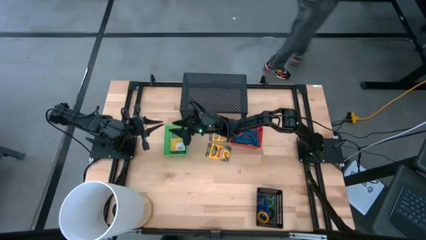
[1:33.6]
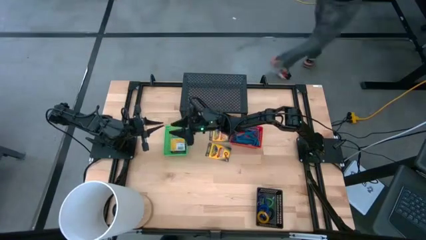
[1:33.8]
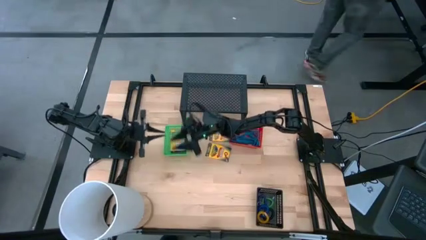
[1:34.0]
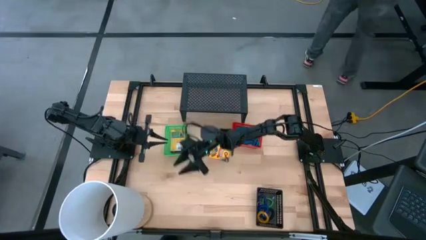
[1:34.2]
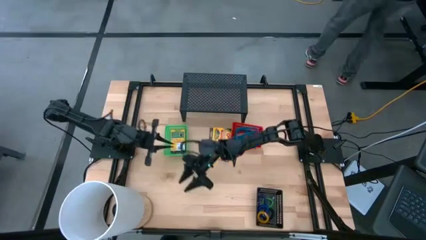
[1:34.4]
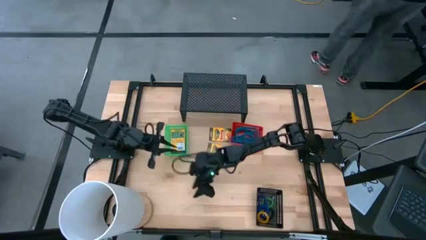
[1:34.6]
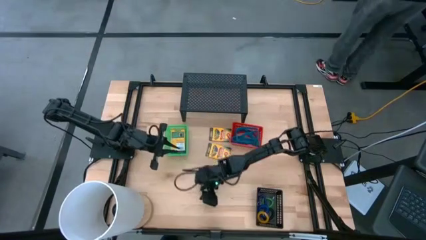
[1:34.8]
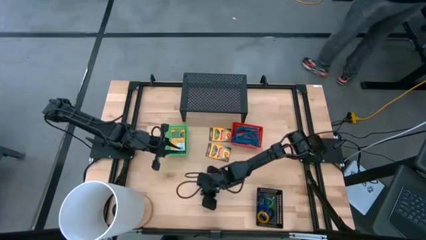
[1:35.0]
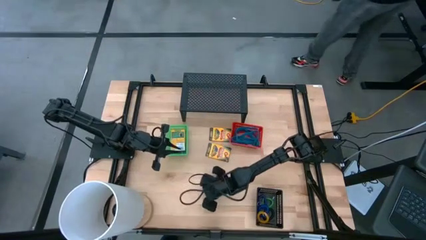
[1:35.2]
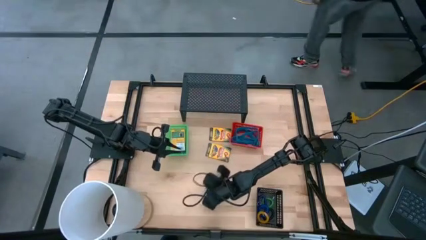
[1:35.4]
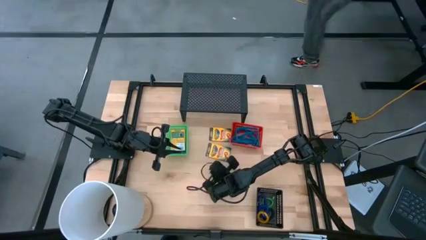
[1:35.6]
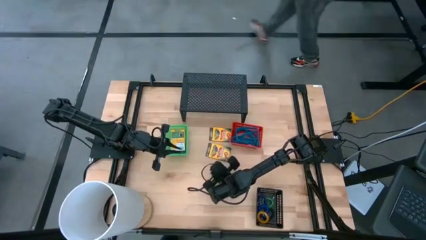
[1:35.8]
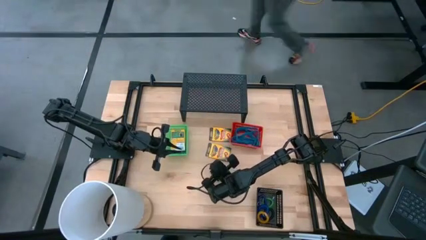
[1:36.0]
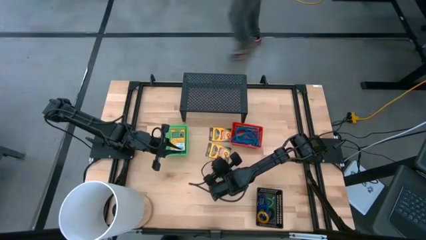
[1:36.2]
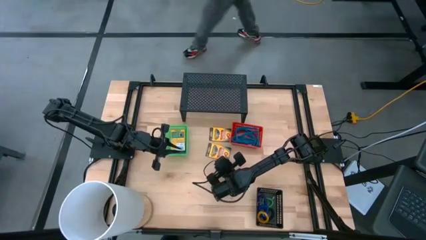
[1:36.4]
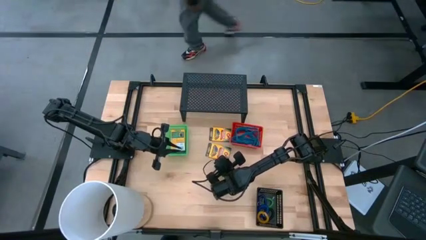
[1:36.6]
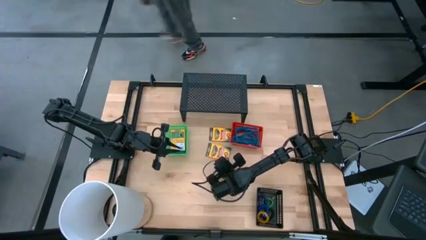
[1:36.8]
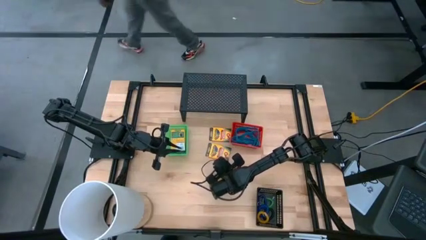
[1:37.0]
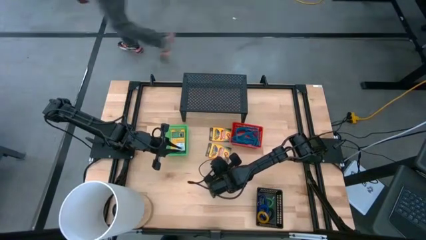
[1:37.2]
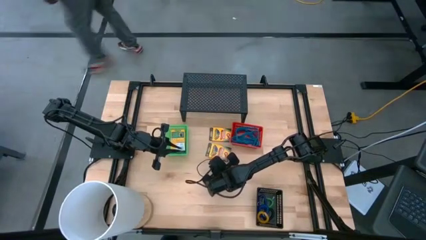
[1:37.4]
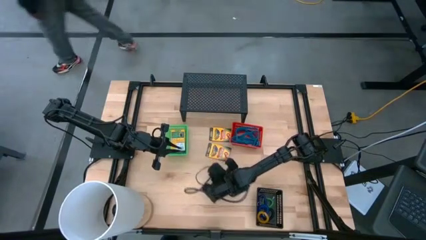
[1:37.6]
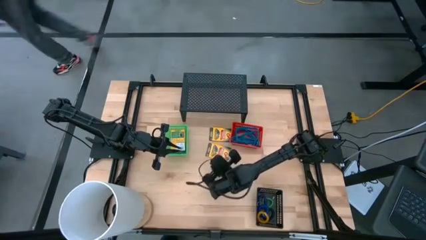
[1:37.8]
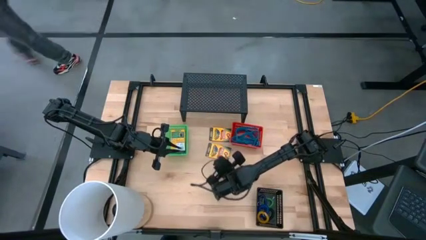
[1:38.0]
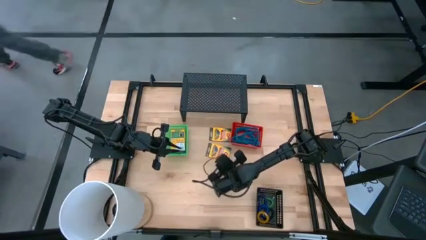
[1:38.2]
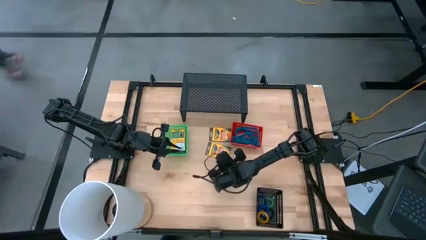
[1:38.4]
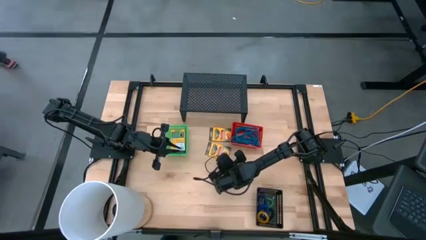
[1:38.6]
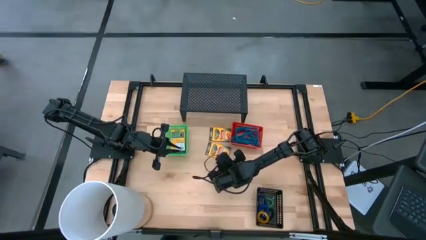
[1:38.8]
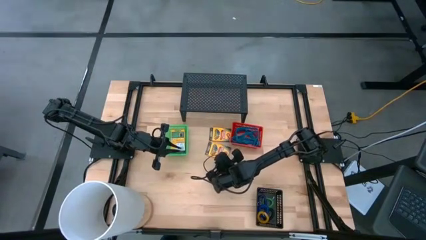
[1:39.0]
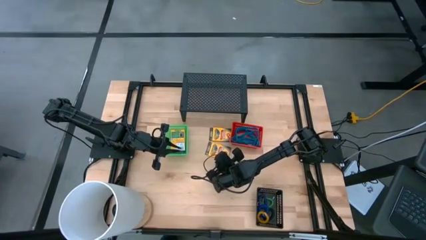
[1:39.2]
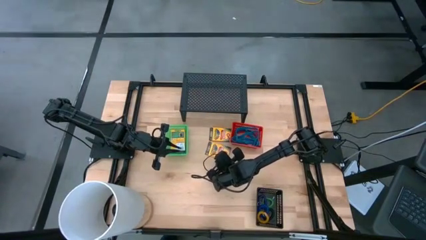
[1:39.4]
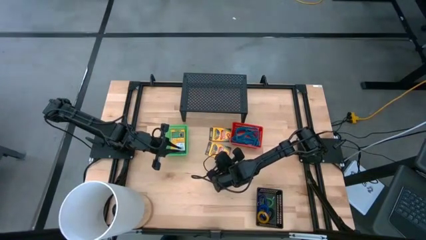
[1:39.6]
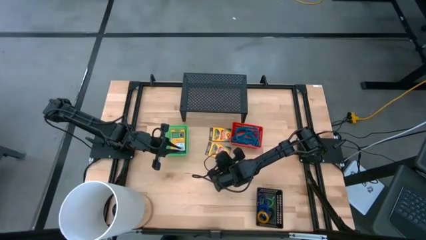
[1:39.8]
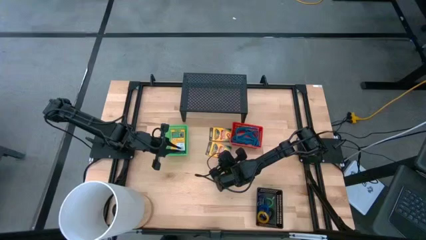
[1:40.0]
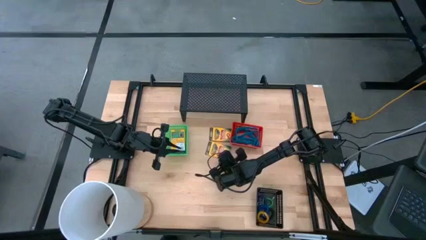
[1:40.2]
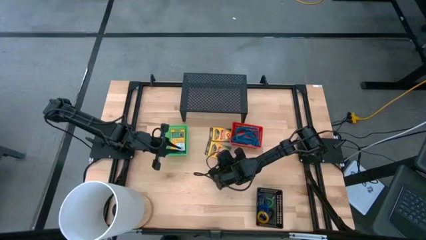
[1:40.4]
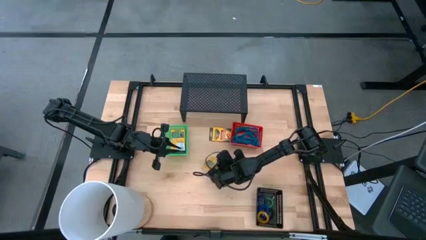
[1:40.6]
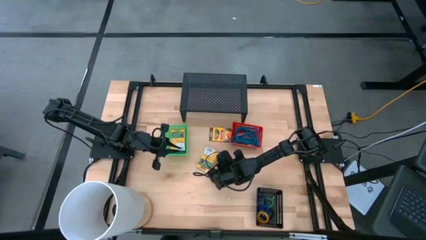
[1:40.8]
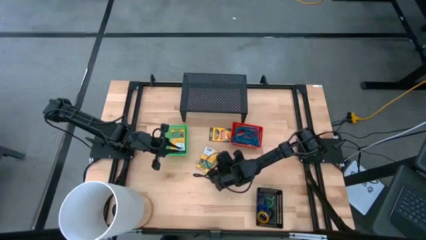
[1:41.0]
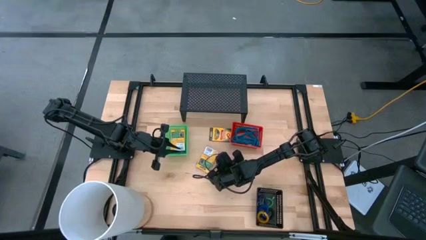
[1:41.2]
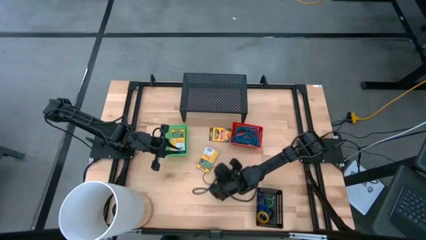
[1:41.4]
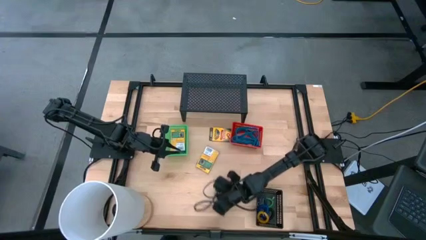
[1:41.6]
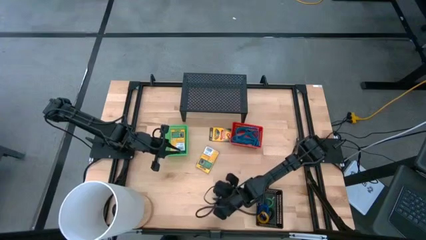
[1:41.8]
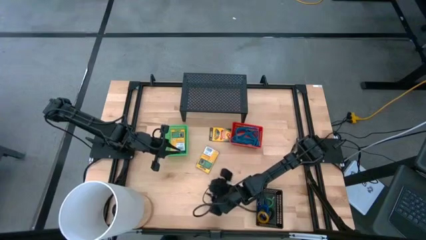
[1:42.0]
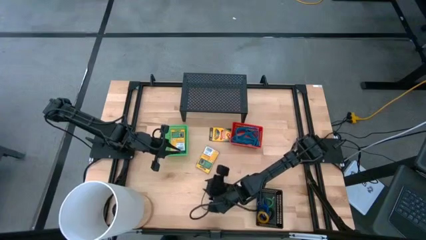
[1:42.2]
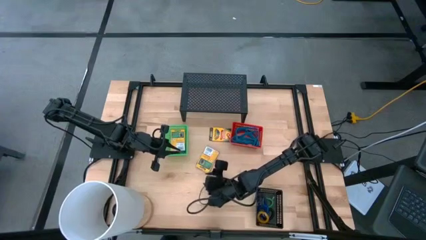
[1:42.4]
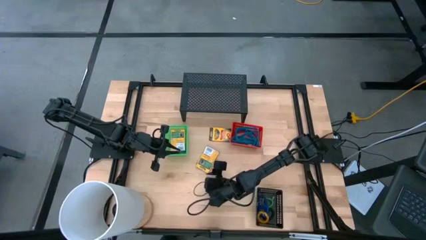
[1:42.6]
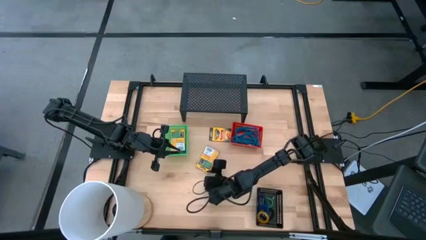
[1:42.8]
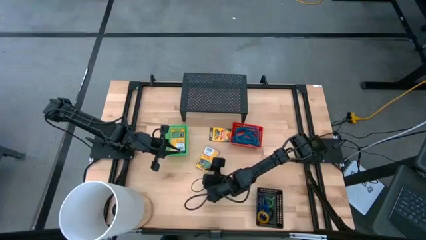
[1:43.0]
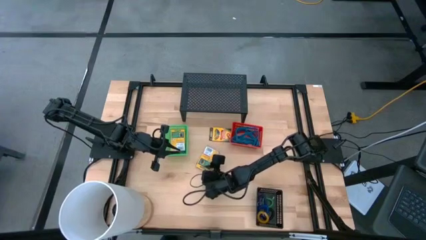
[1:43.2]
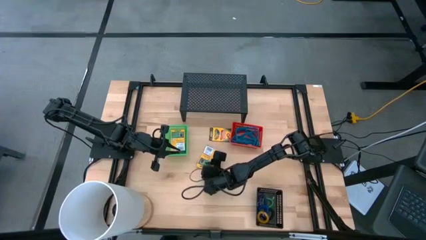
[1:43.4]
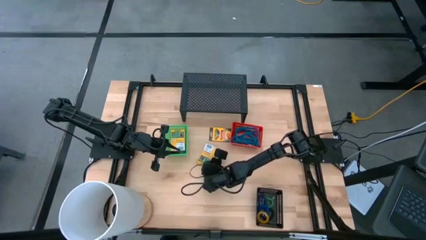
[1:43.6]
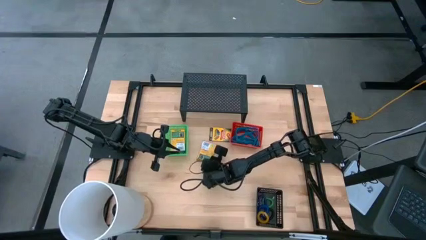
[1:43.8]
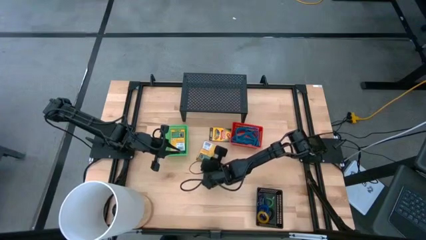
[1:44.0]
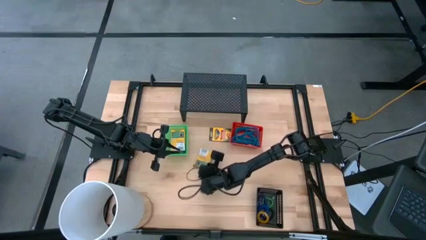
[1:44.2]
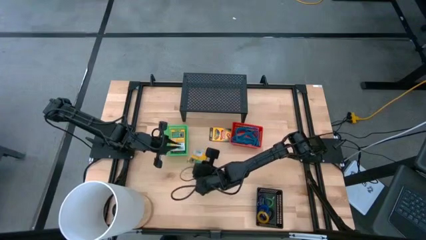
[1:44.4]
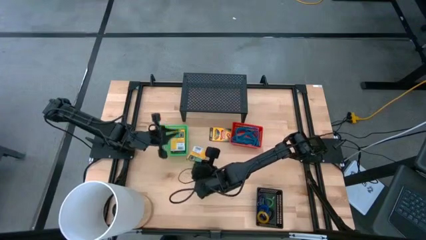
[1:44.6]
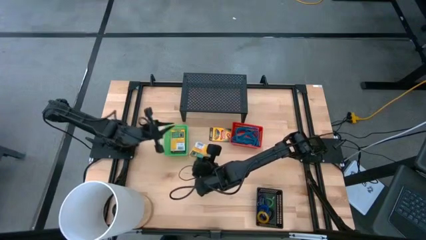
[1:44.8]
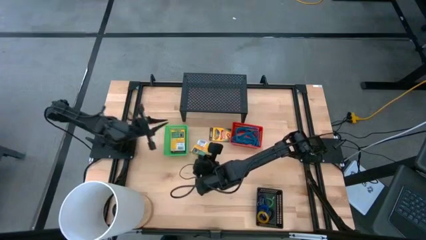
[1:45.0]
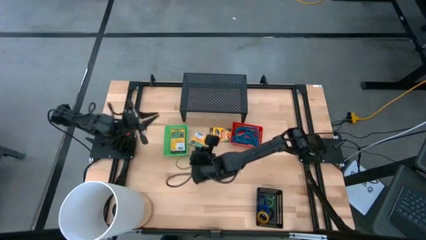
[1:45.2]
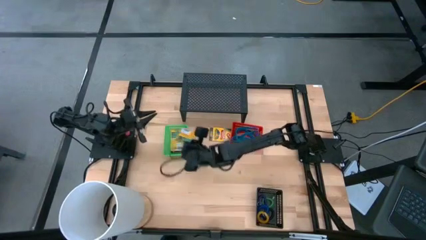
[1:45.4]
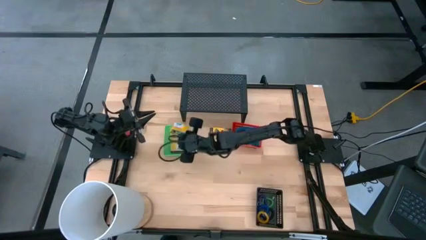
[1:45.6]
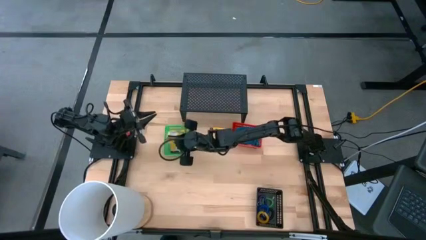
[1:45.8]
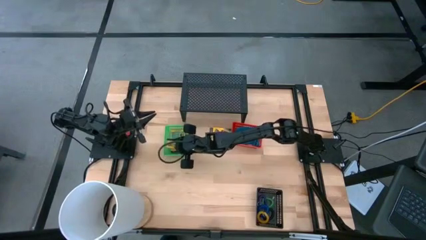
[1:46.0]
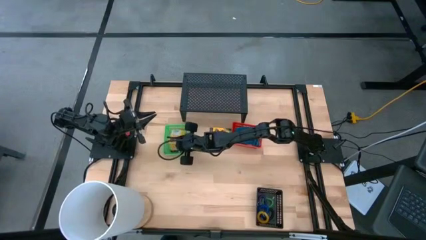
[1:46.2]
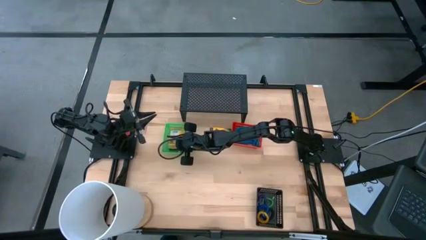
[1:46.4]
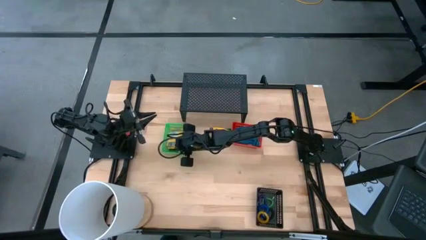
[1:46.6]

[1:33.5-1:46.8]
Task: Pick & Place Office Desk Supplies
Put the box of crayon into the black bin
